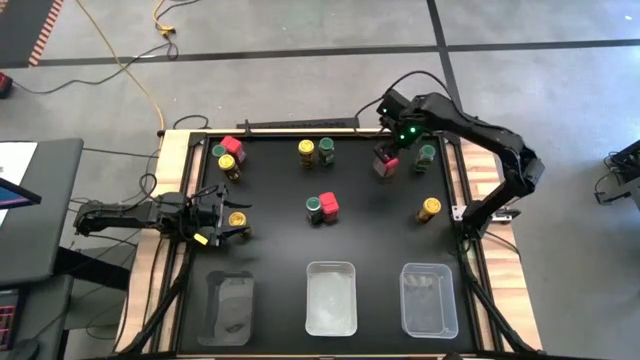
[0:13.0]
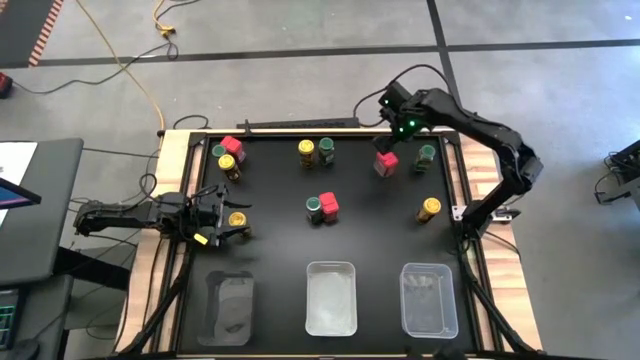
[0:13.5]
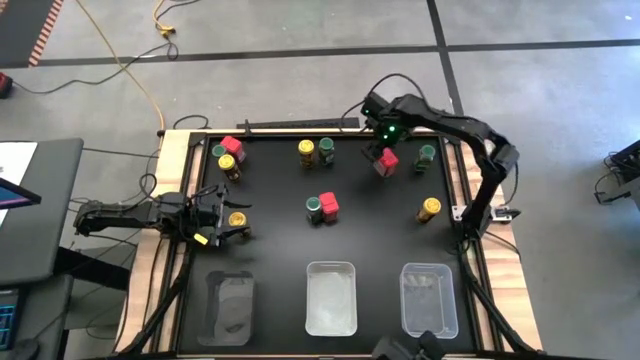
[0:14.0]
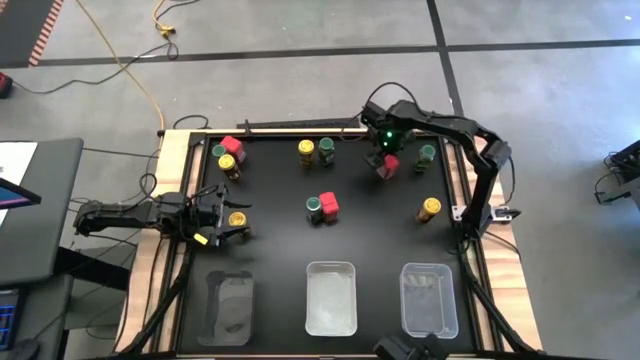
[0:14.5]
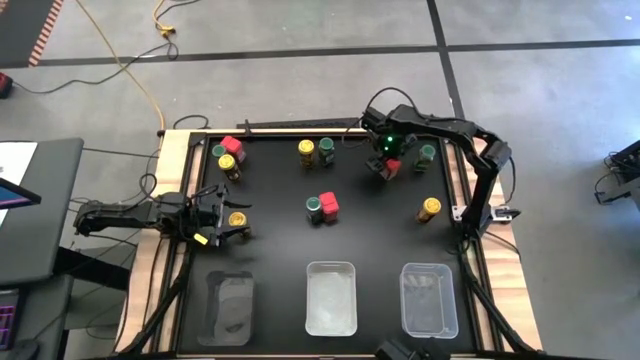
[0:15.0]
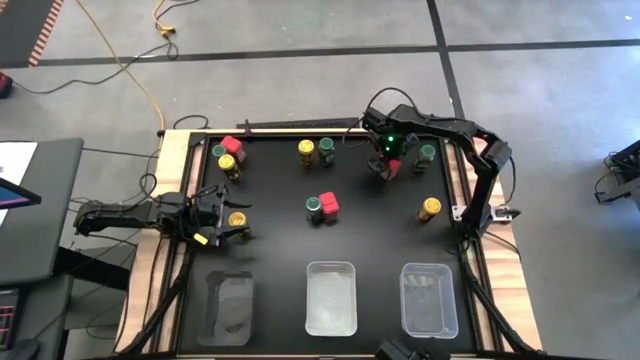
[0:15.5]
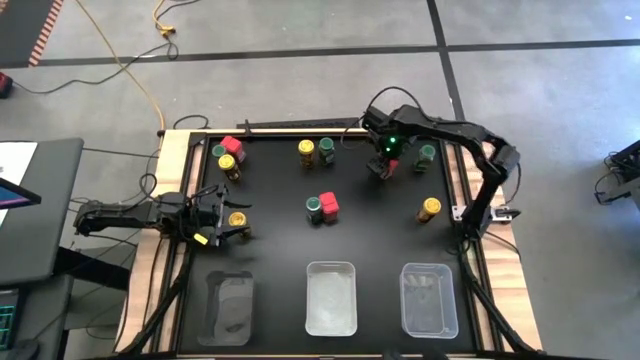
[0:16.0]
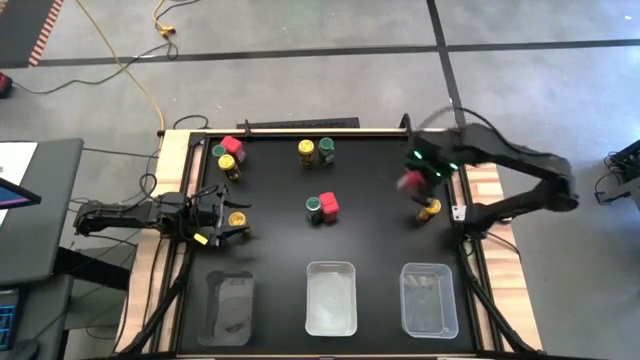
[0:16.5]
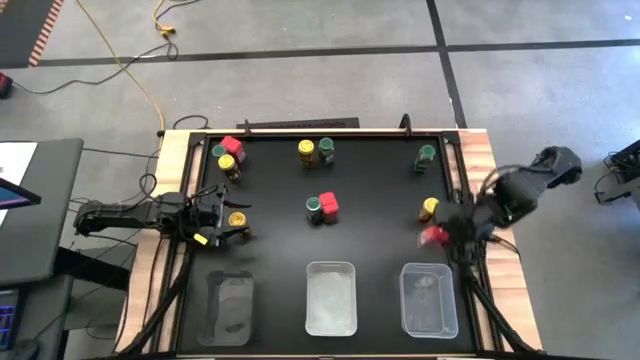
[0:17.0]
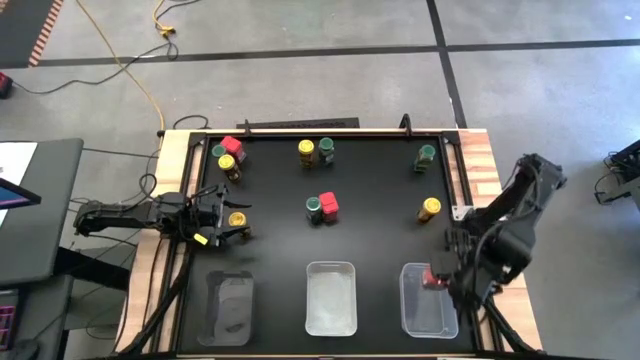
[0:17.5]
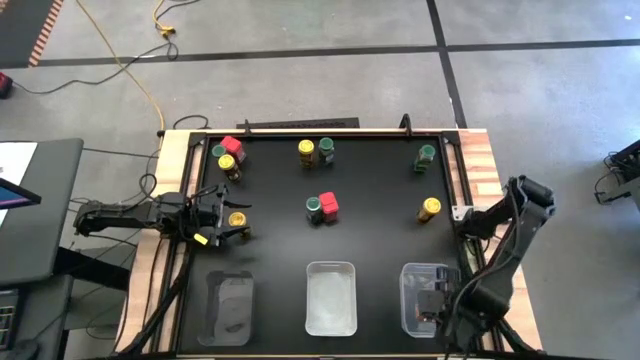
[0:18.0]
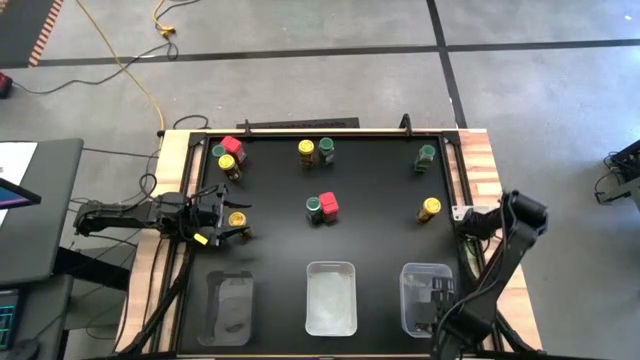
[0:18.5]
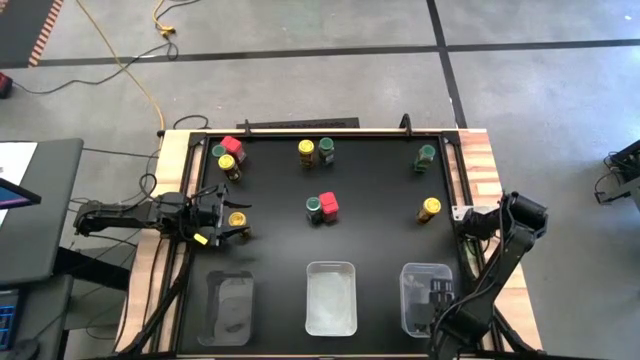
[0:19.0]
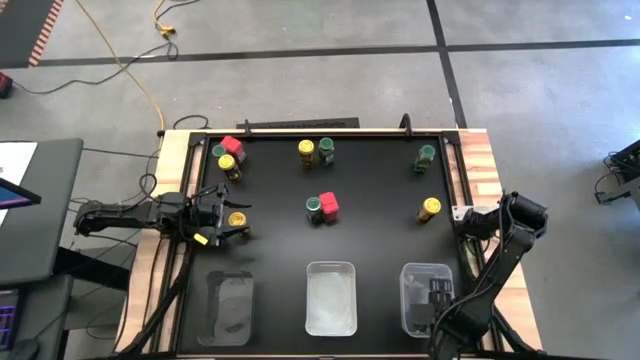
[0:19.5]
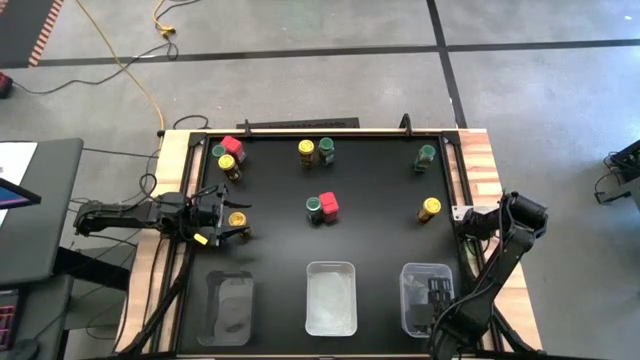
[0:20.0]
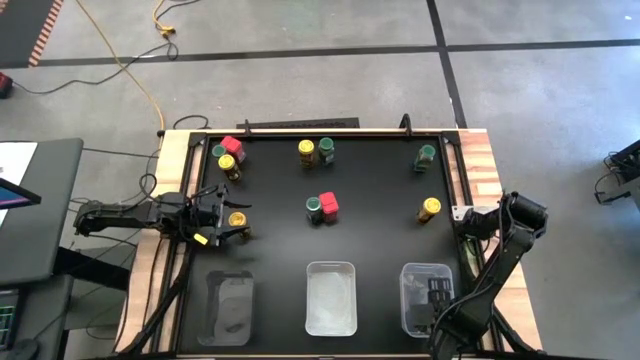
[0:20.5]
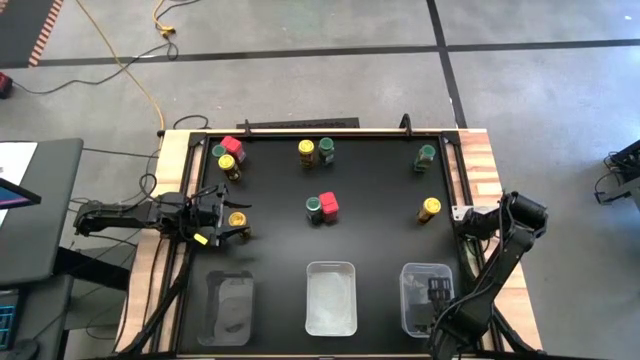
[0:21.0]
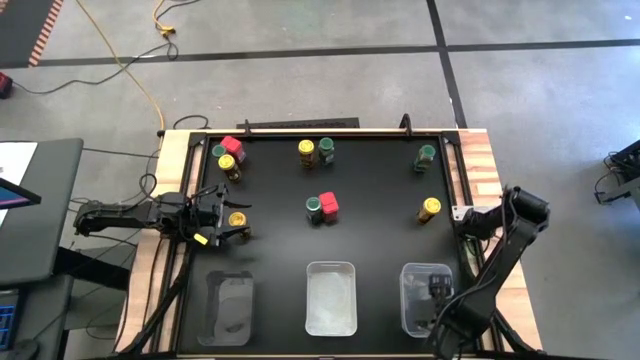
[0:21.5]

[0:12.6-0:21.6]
Task: Sort spices by type
Put the top right red seasoning can into the transparent bin

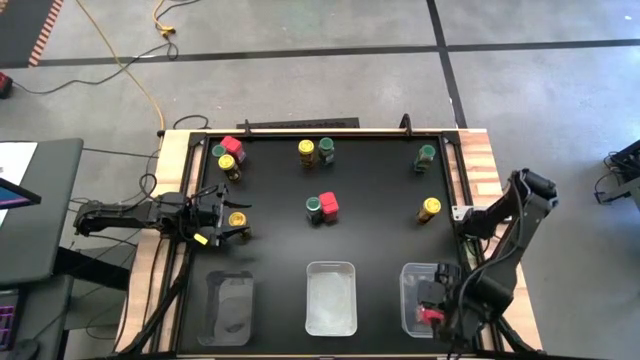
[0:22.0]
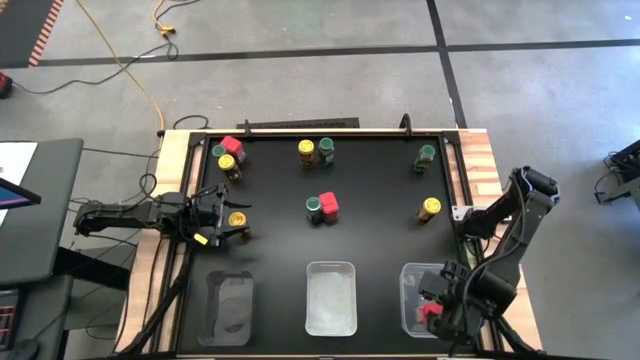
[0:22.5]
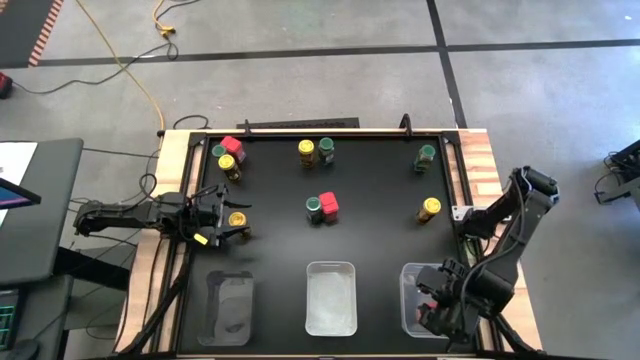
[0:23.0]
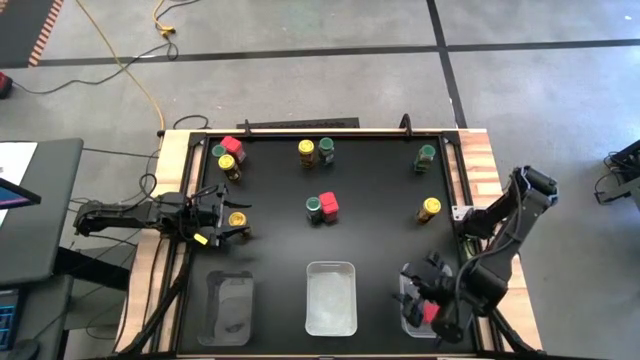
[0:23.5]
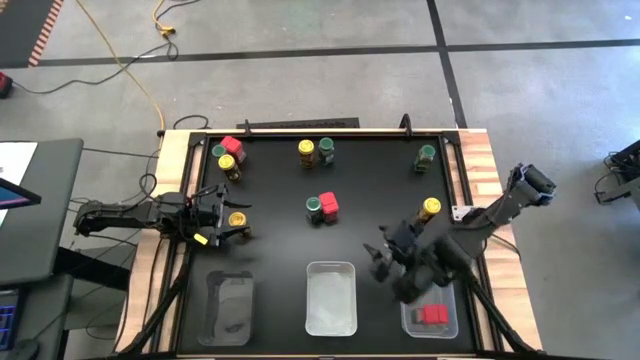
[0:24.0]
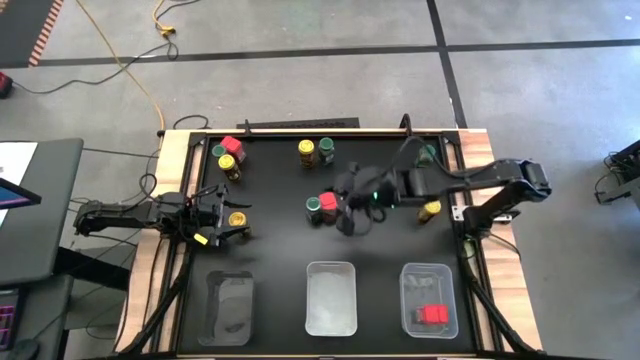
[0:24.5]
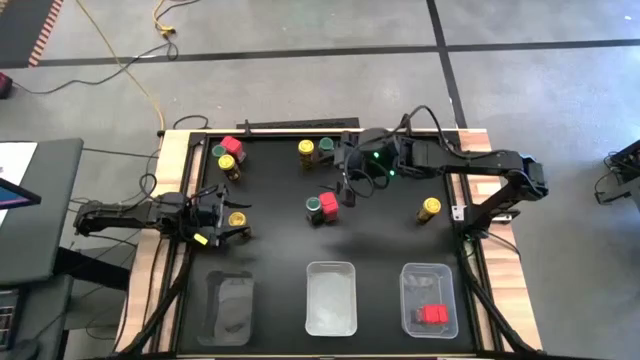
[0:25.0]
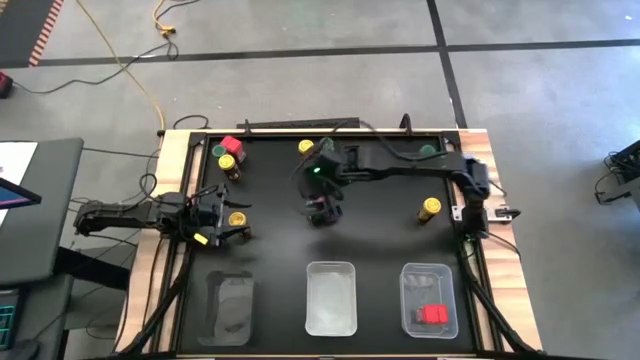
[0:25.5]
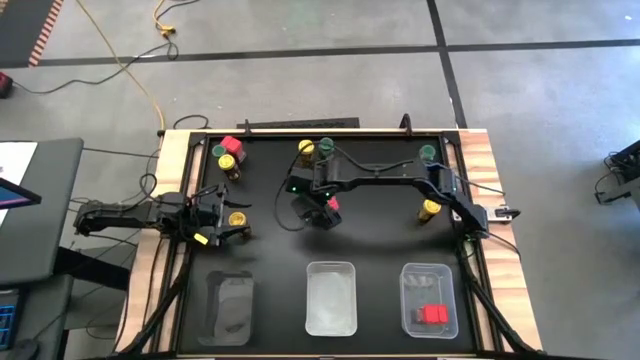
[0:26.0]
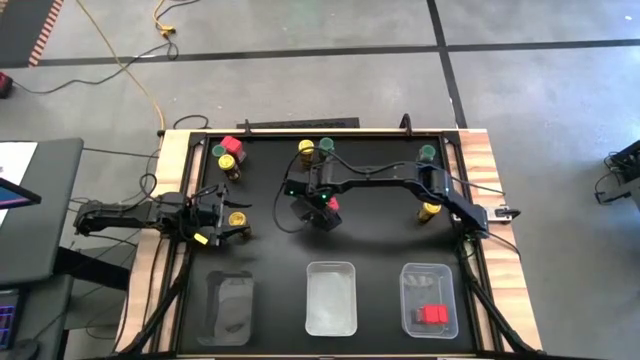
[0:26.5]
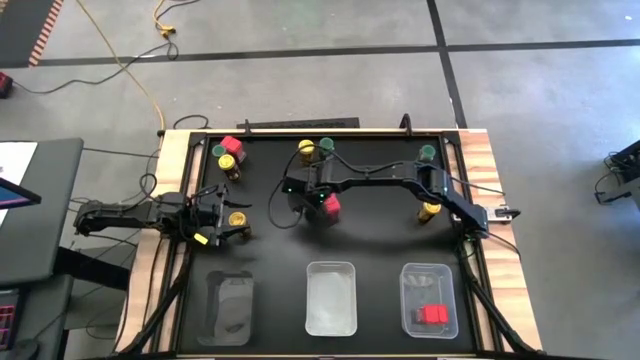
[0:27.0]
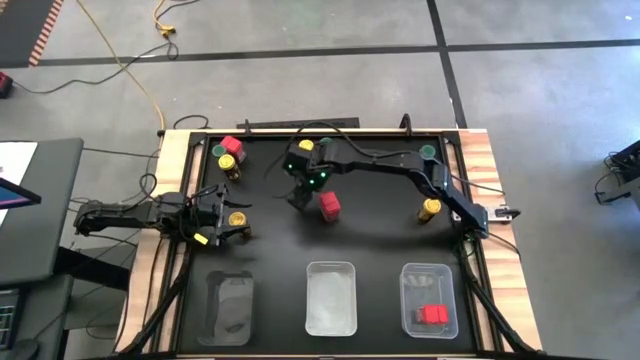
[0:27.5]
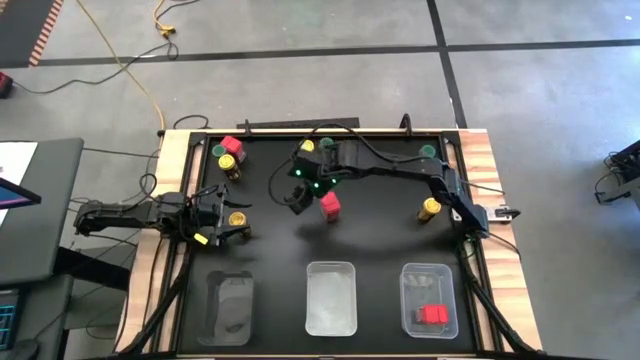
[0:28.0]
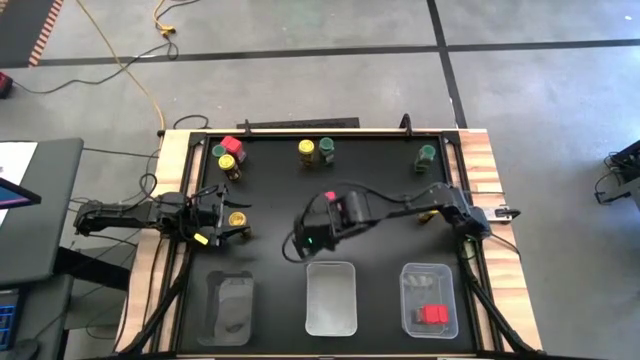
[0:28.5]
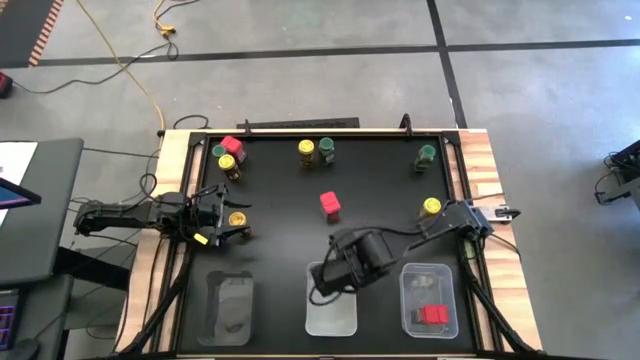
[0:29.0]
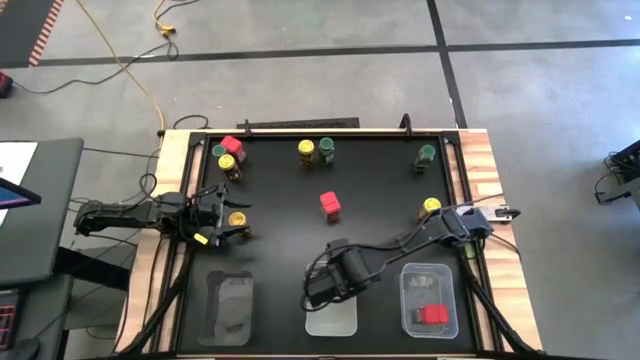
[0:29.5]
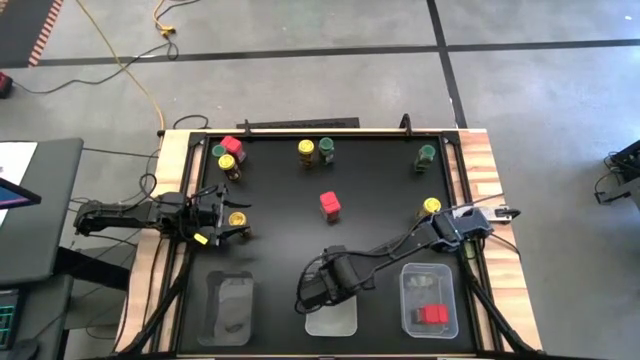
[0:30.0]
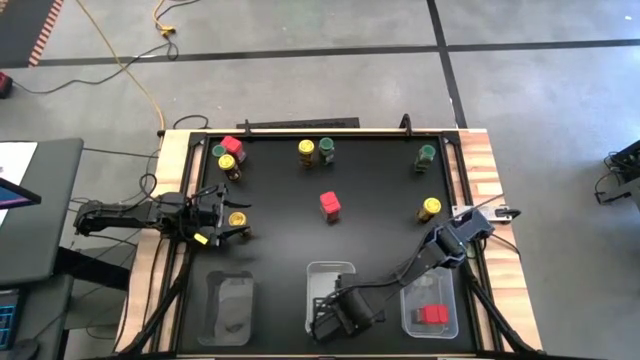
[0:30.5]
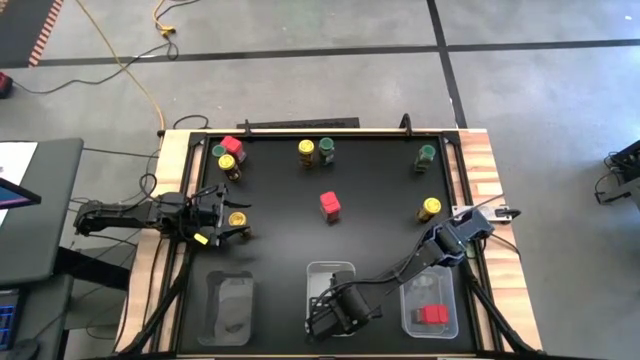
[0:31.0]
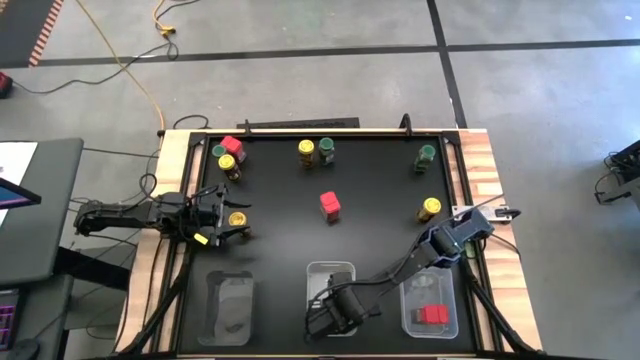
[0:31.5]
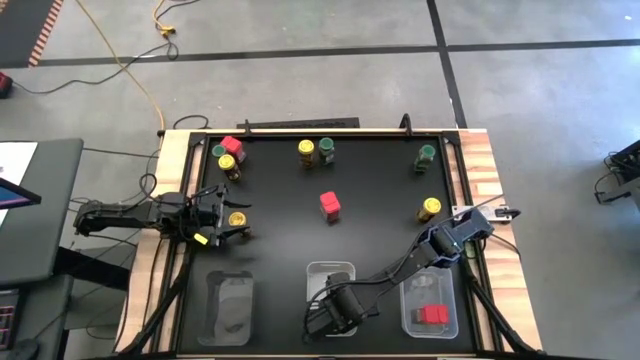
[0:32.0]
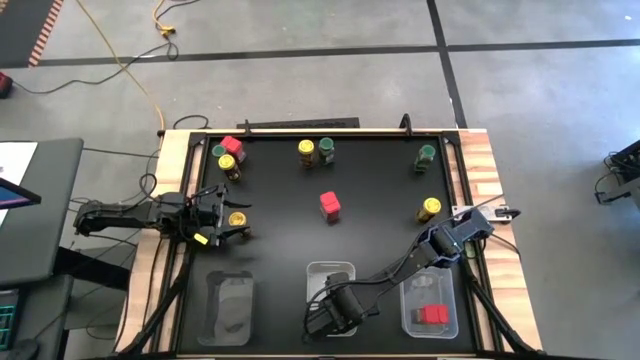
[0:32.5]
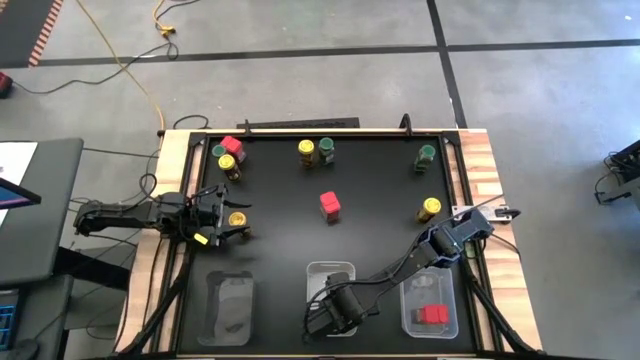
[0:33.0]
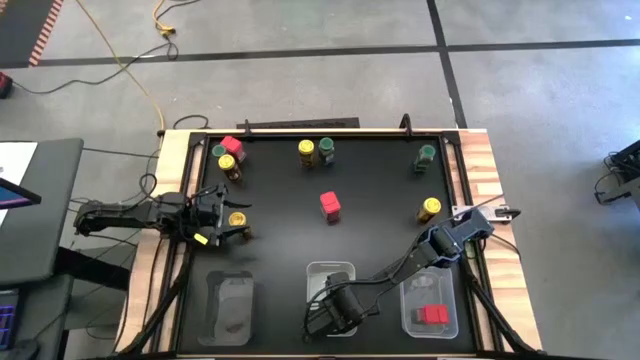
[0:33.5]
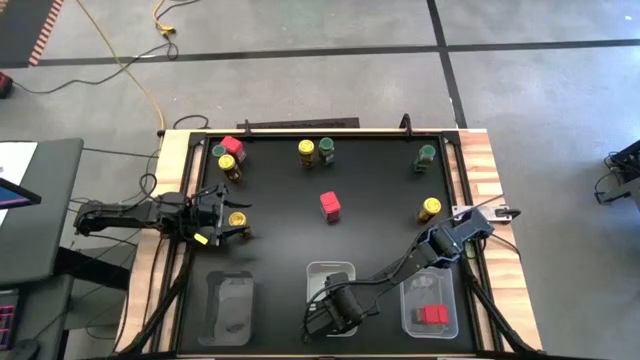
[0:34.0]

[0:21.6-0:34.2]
Put the bottom center green seasoning bottle into the white bin
